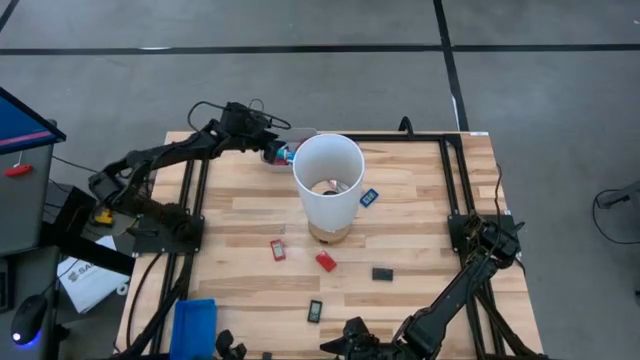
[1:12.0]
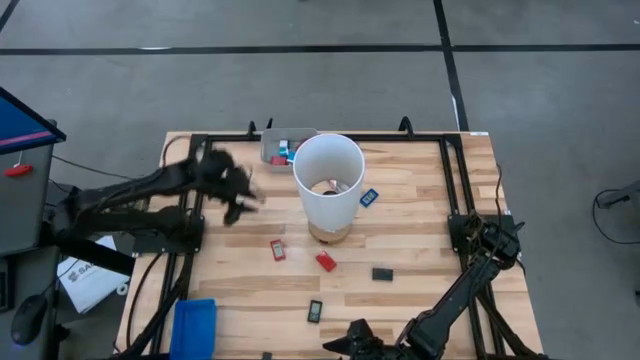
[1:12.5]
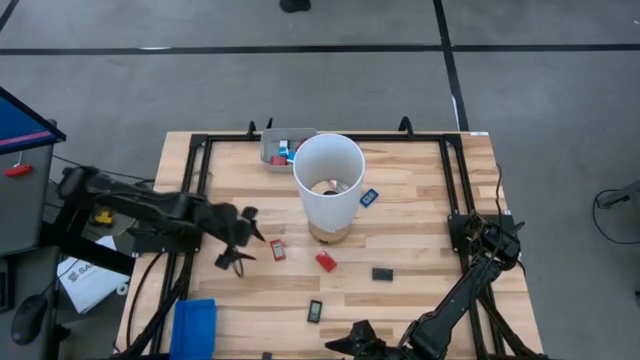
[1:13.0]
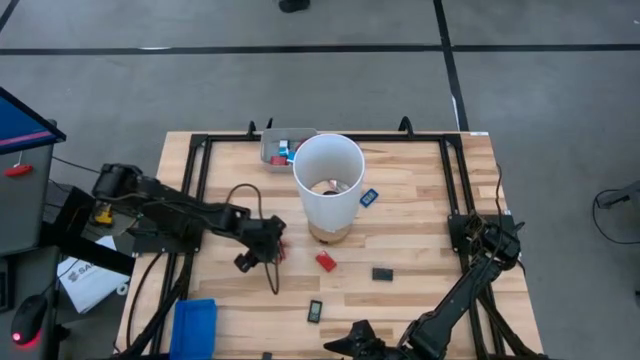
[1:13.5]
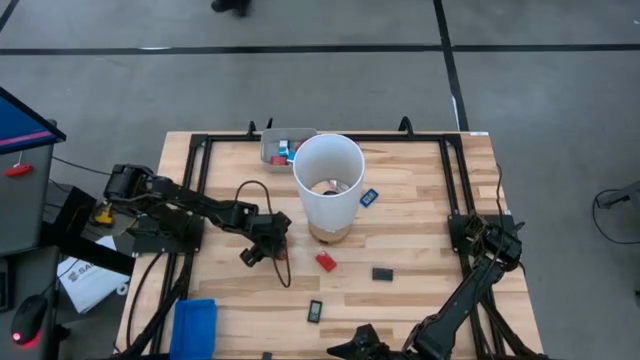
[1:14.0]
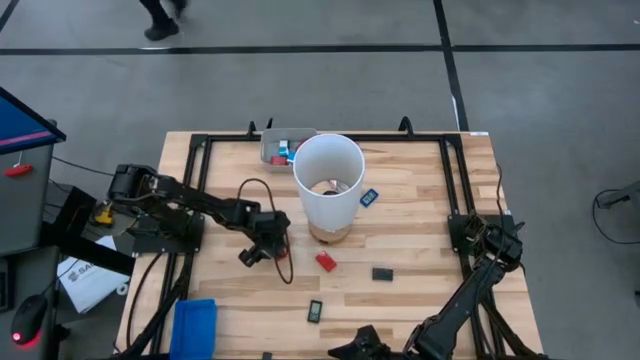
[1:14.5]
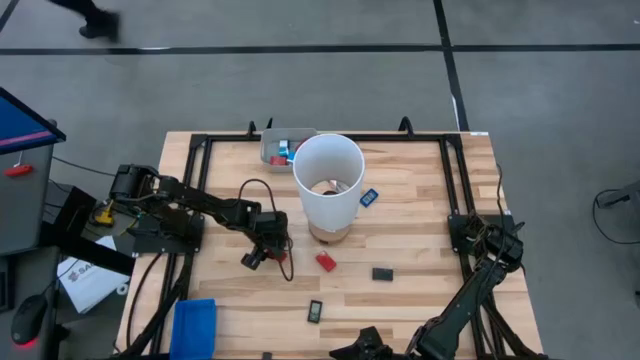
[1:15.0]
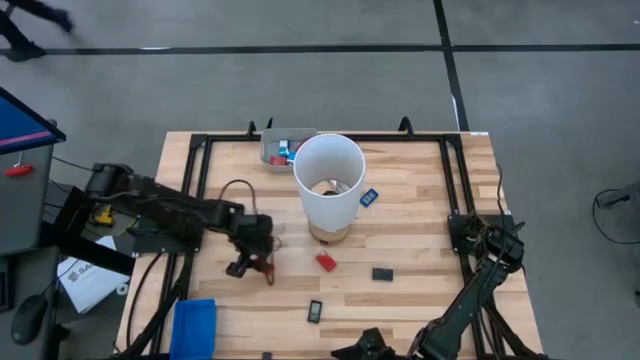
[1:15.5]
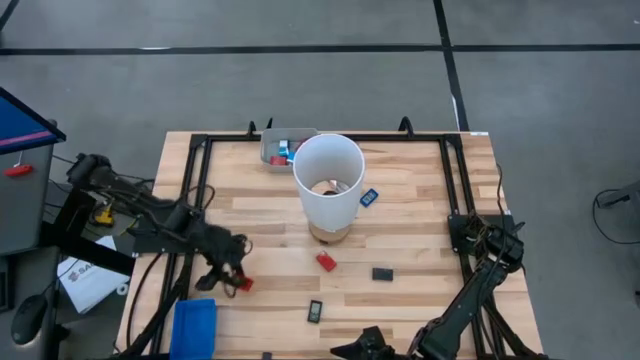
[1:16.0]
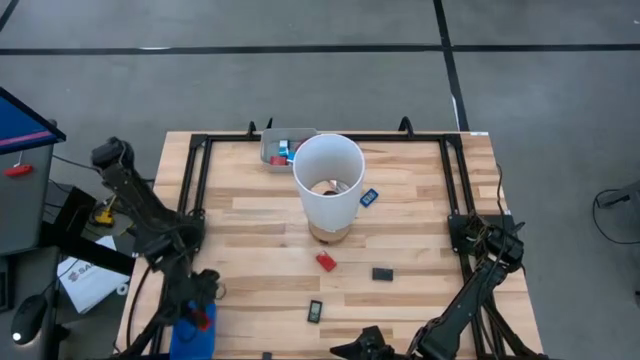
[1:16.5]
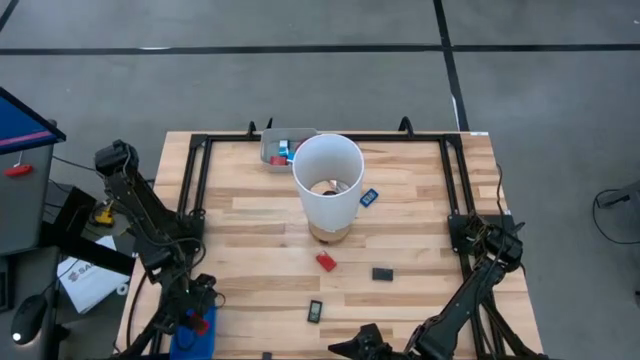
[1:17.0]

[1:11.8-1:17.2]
Task: Pick & Place Office items
Put the left red digital timer into the blue bin

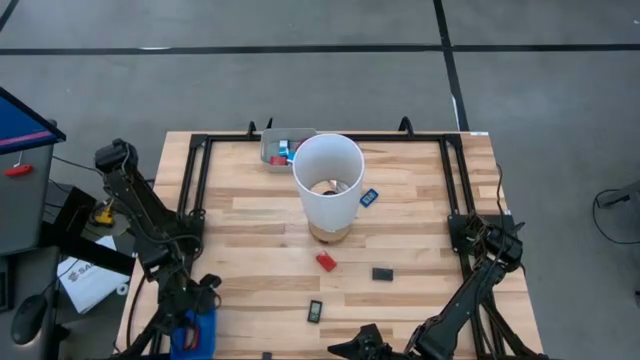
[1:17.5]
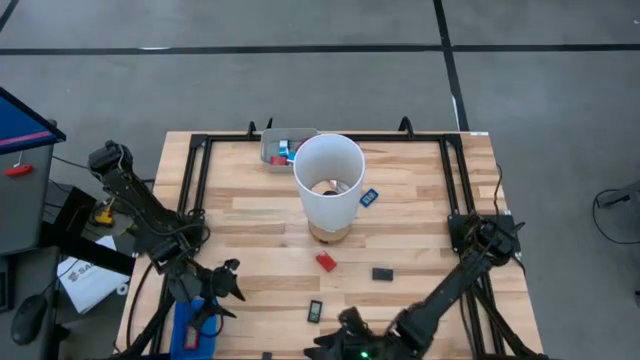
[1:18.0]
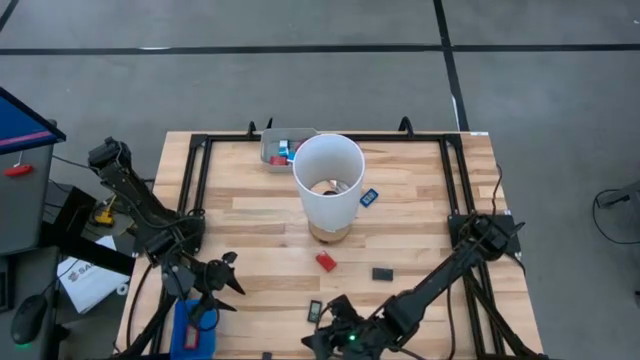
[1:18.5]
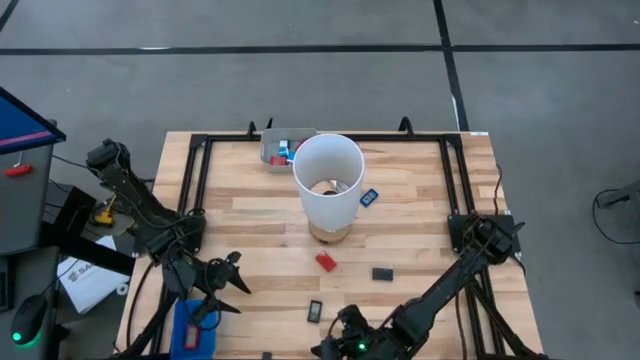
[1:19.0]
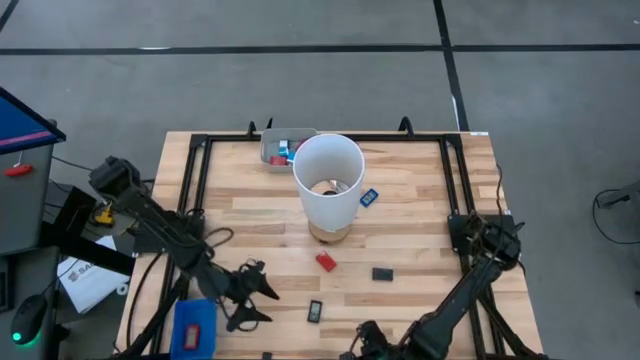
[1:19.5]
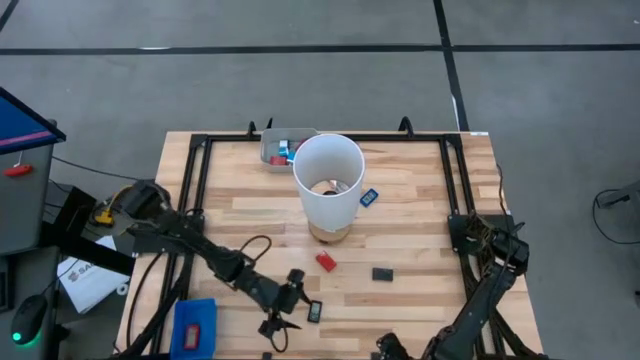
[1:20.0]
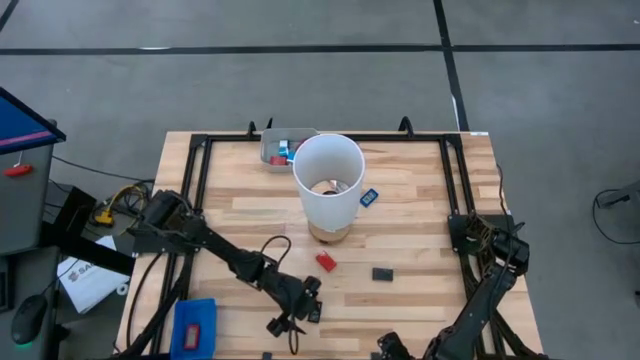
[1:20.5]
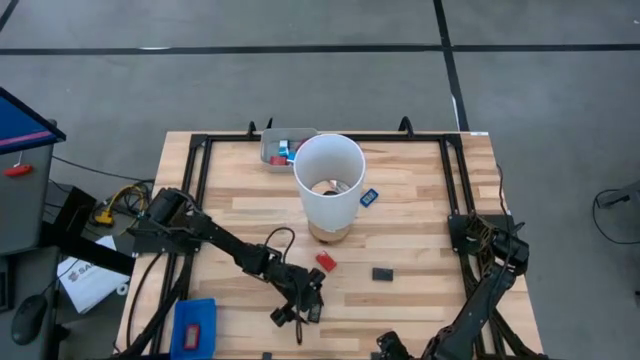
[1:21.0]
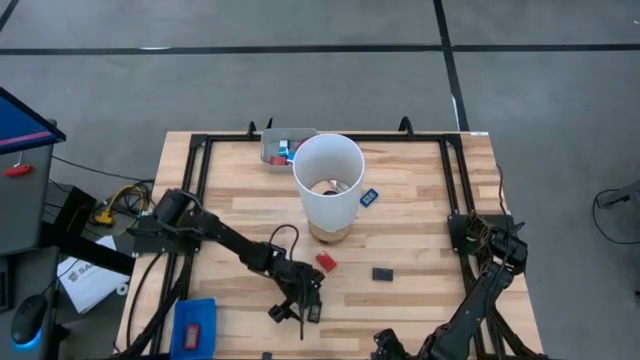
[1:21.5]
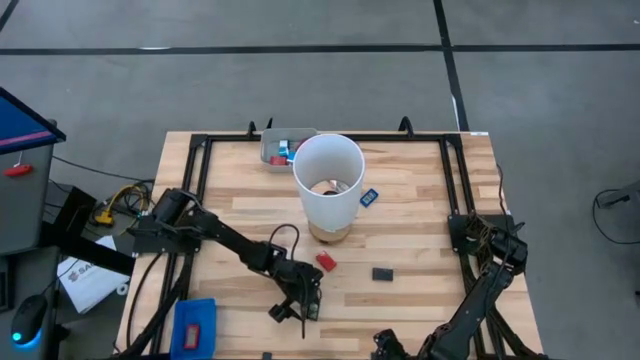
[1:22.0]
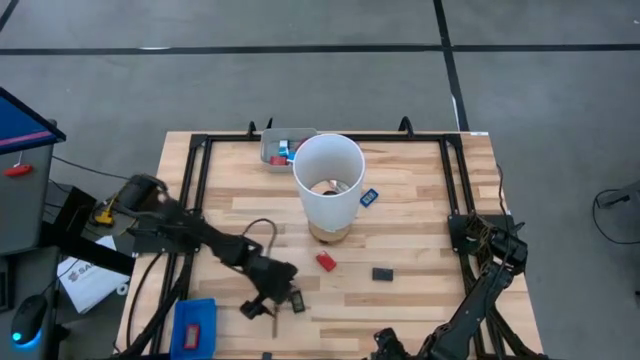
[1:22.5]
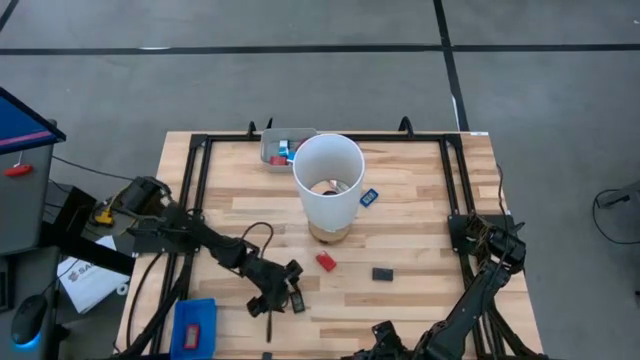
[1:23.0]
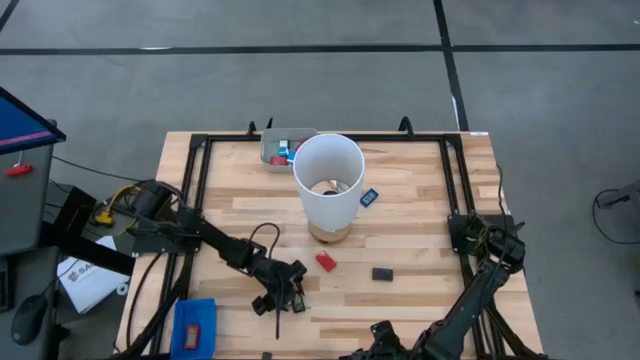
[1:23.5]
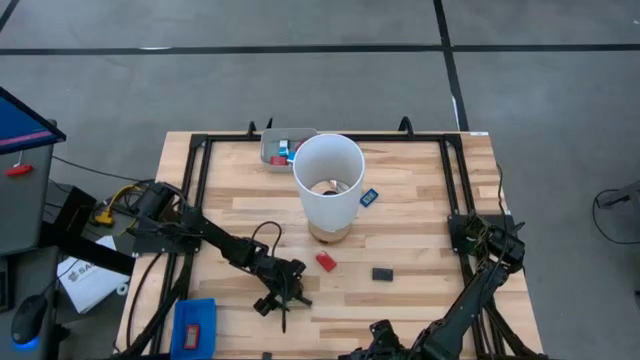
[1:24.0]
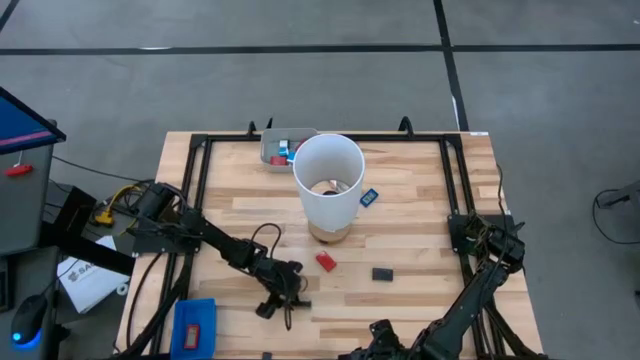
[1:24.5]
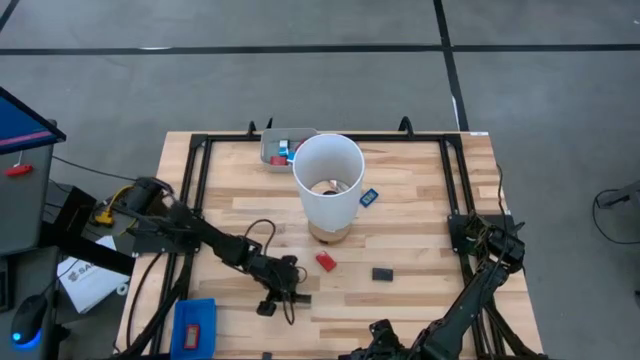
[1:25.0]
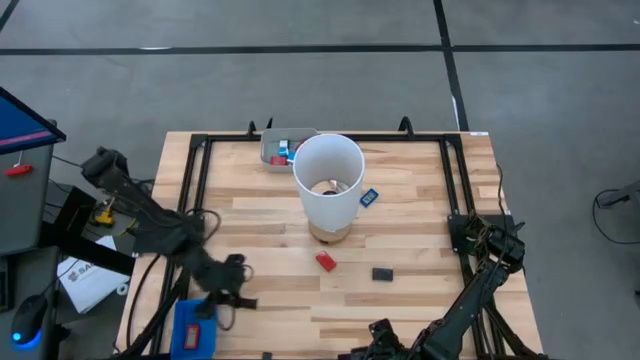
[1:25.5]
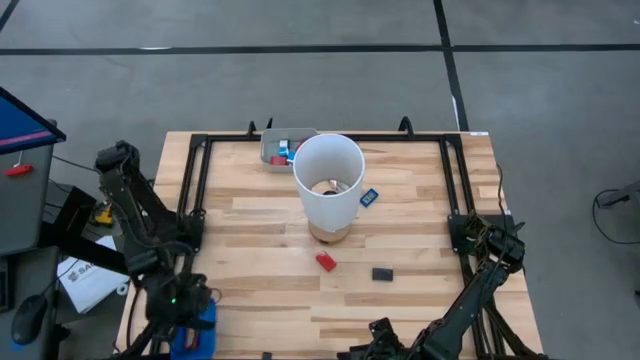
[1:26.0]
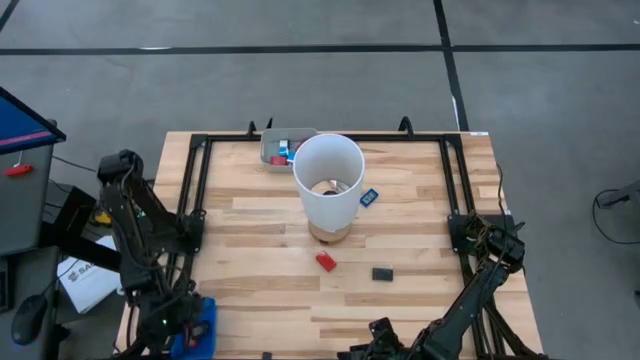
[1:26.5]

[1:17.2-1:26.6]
Put the left black digital timer into the blue bin

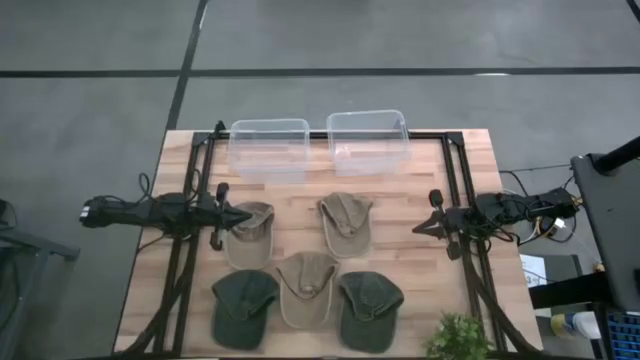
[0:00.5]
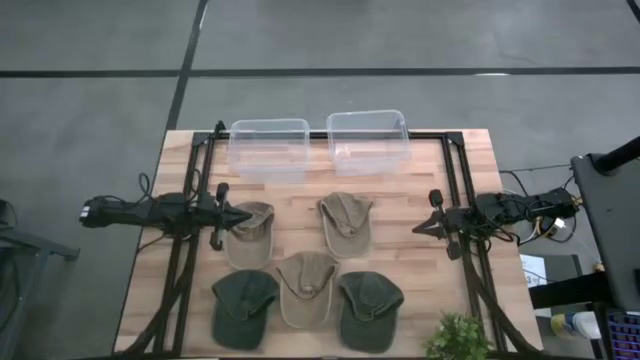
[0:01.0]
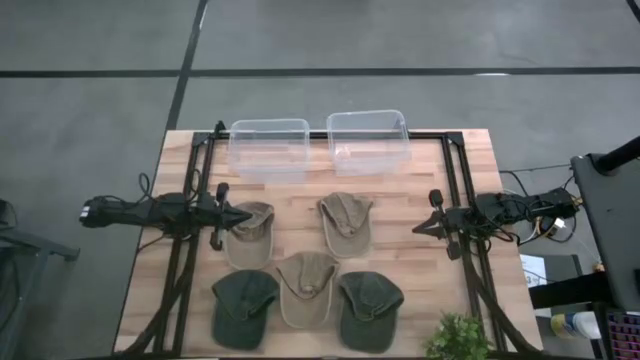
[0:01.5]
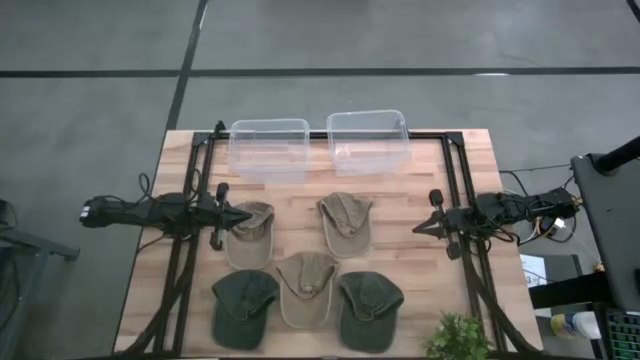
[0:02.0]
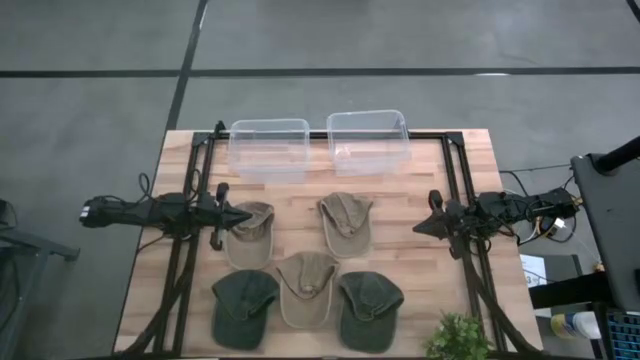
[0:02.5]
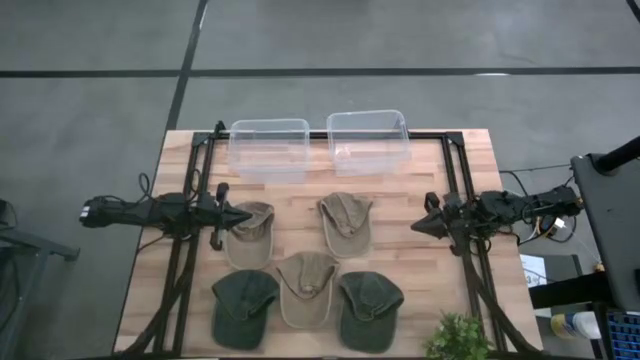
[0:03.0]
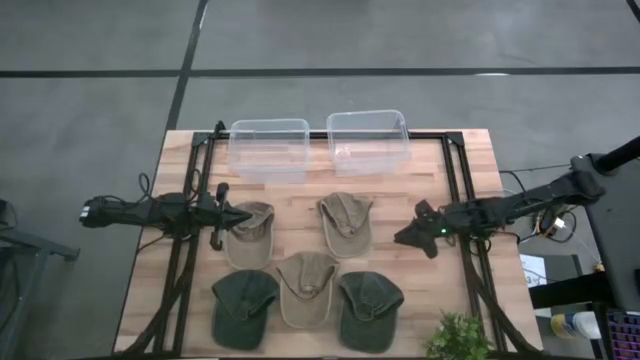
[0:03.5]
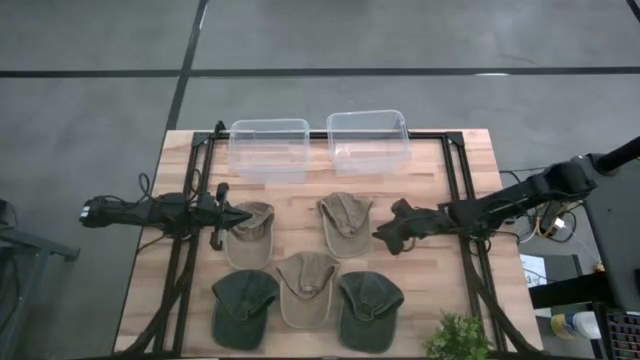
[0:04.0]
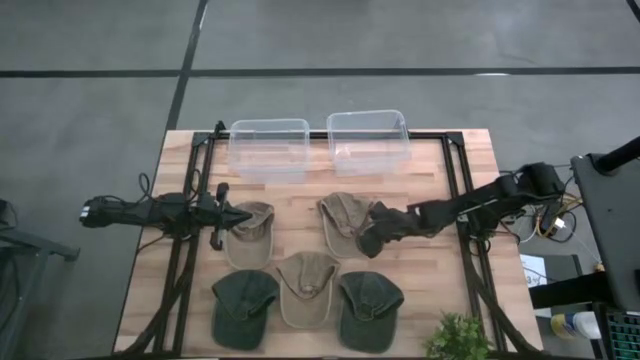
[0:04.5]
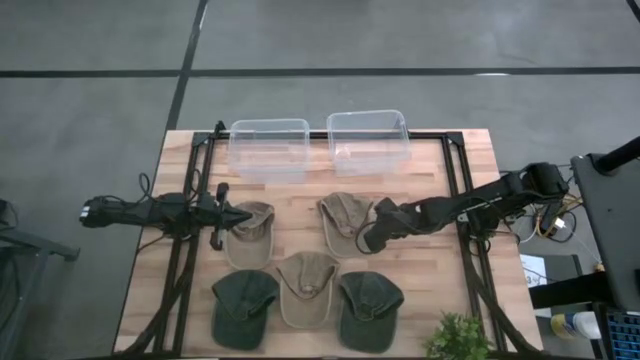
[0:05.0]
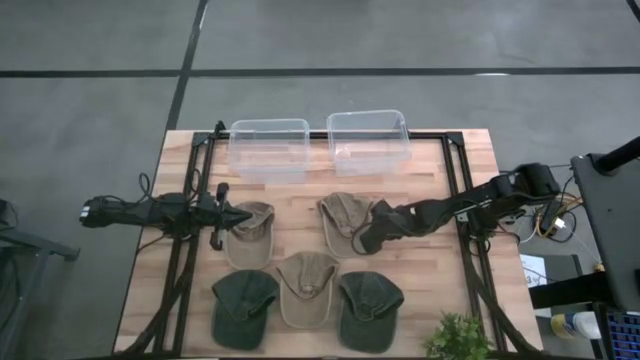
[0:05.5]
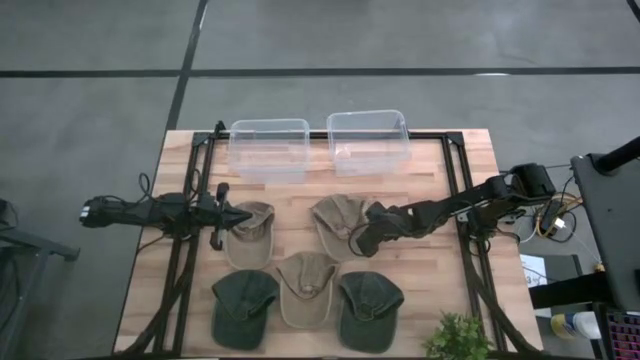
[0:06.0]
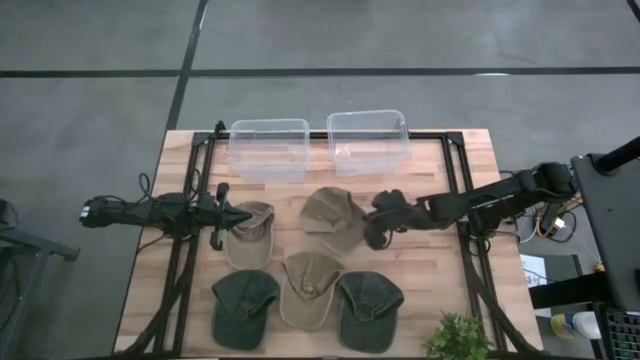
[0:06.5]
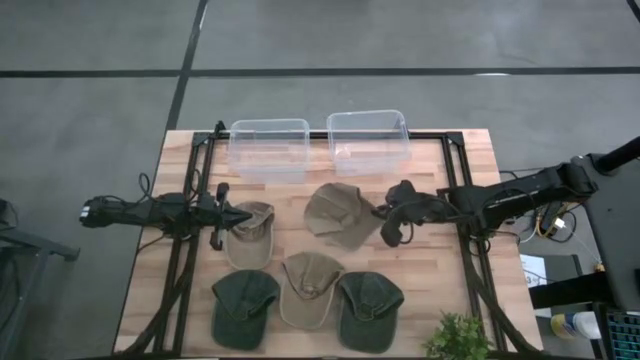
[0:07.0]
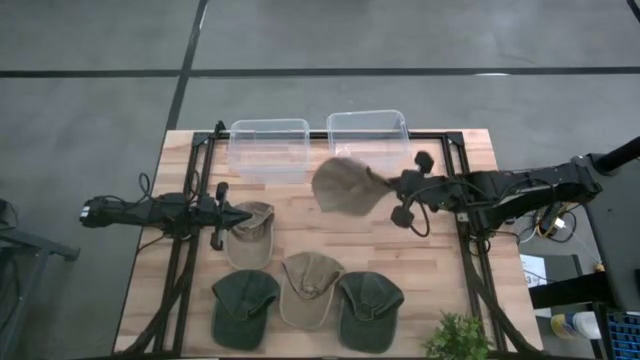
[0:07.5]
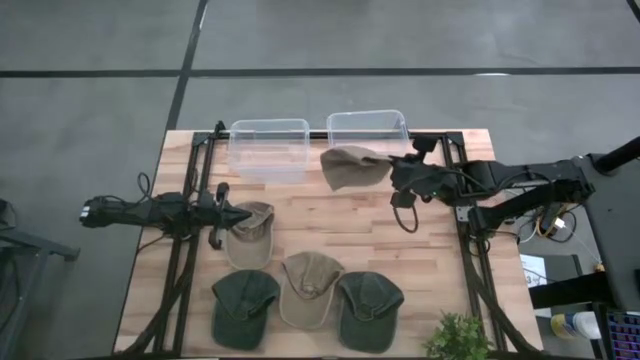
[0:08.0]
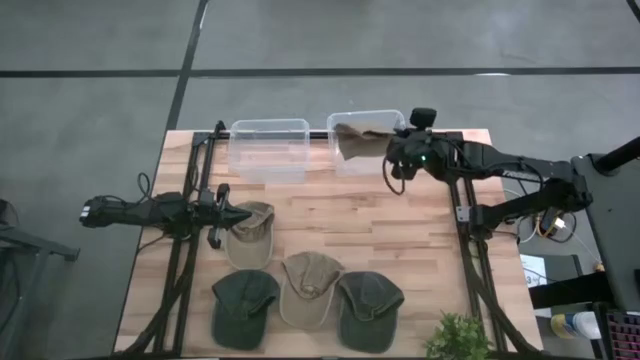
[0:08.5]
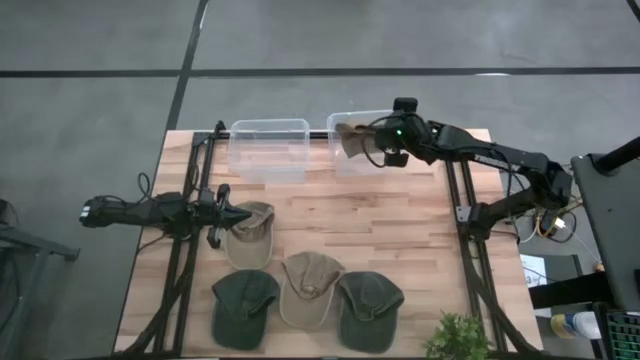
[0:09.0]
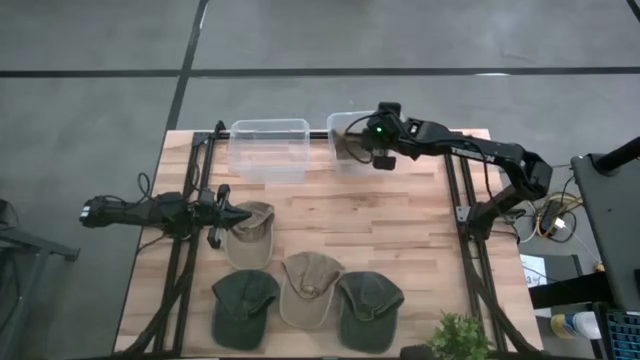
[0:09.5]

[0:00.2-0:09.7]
Task: Pick & Place hat
Put the top right brown cap into the right transparent bin
